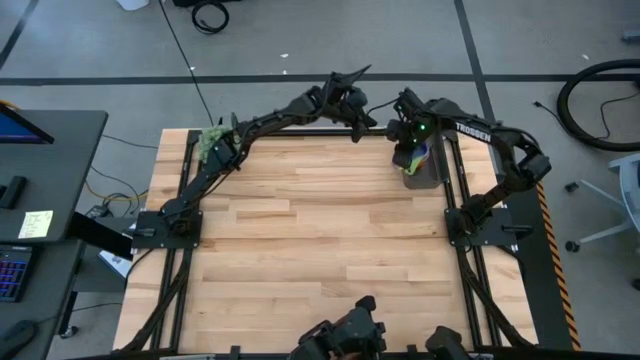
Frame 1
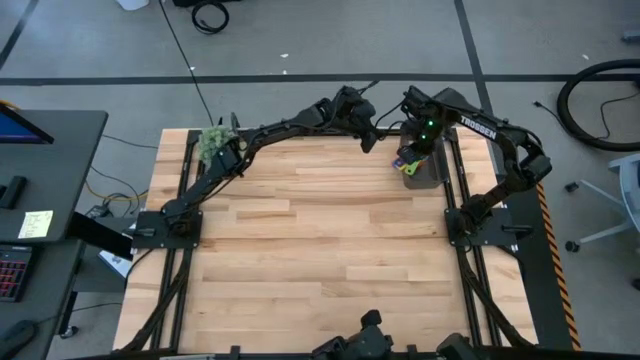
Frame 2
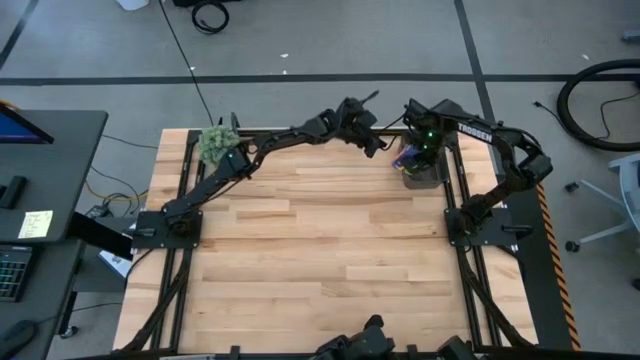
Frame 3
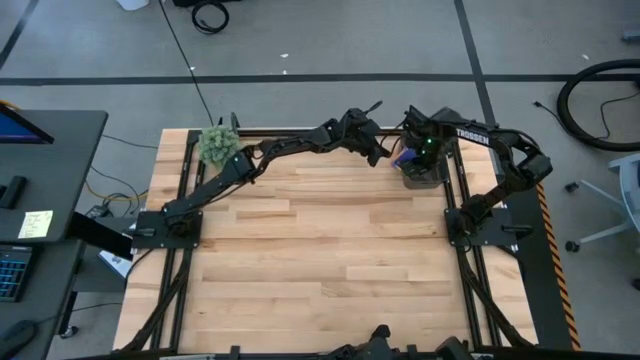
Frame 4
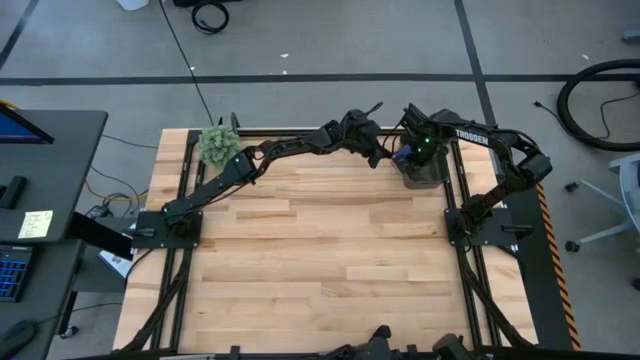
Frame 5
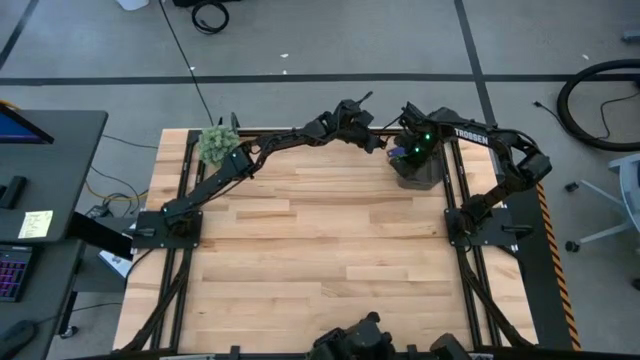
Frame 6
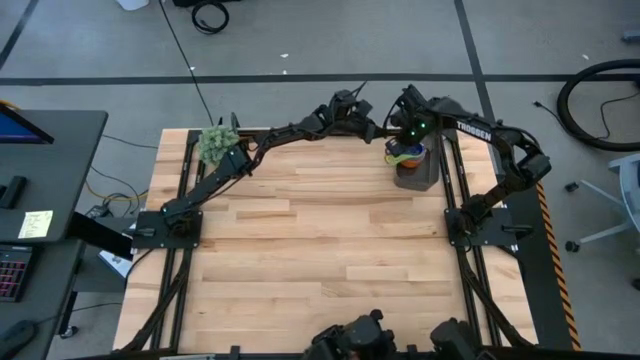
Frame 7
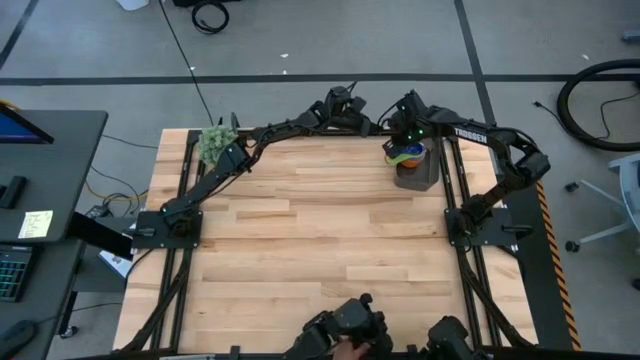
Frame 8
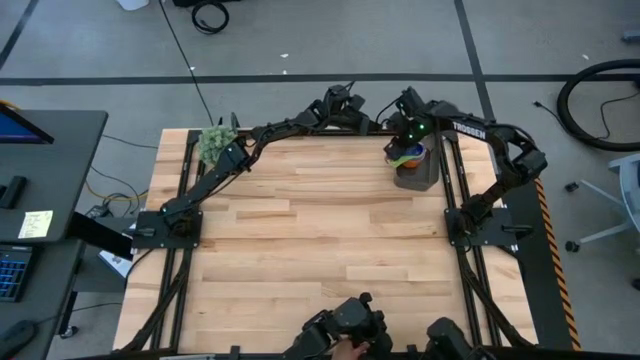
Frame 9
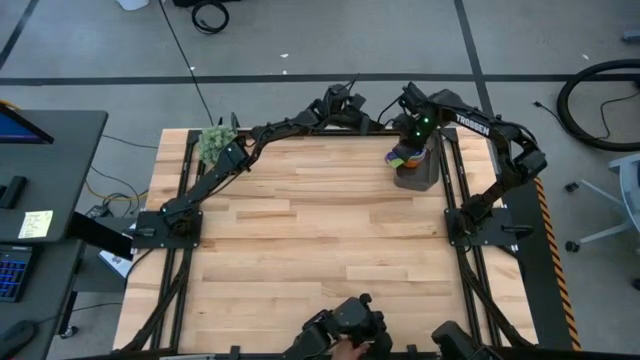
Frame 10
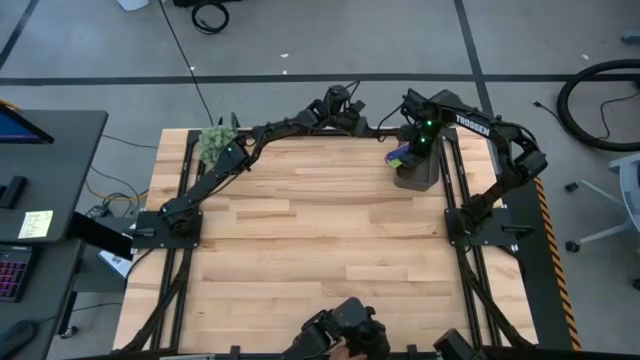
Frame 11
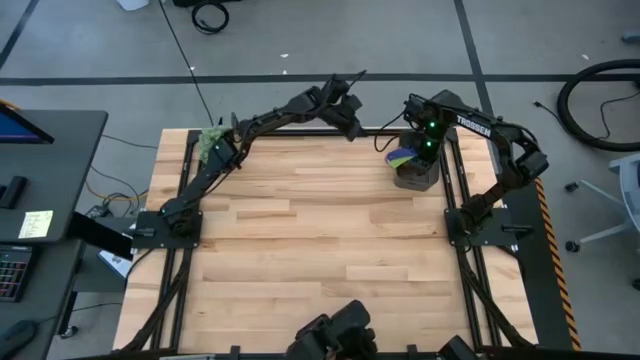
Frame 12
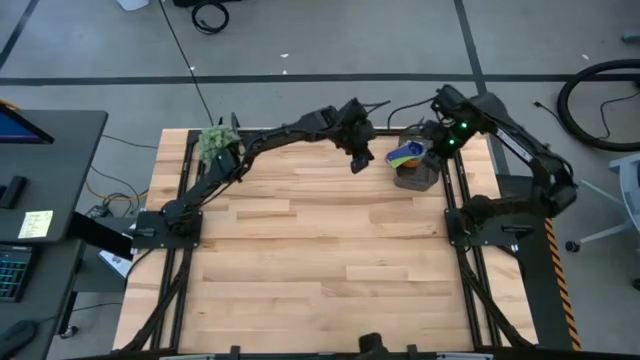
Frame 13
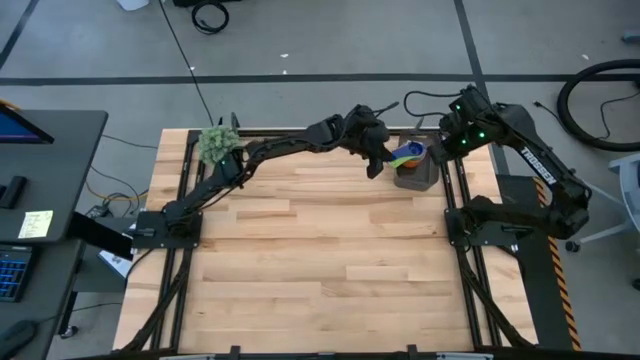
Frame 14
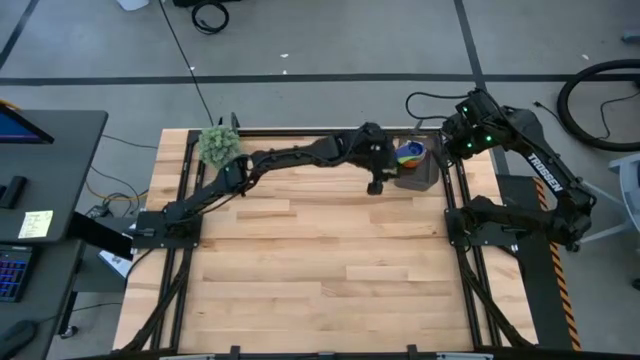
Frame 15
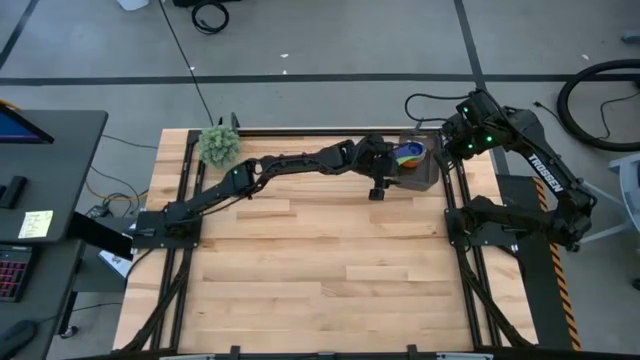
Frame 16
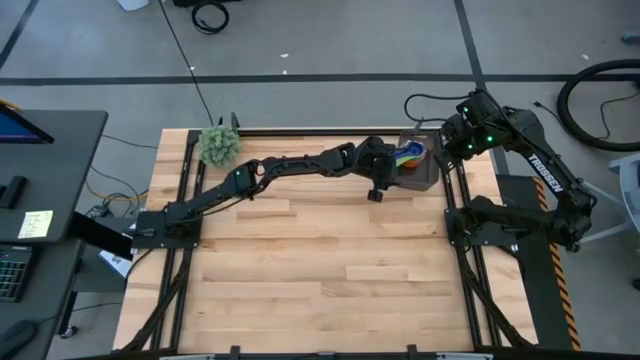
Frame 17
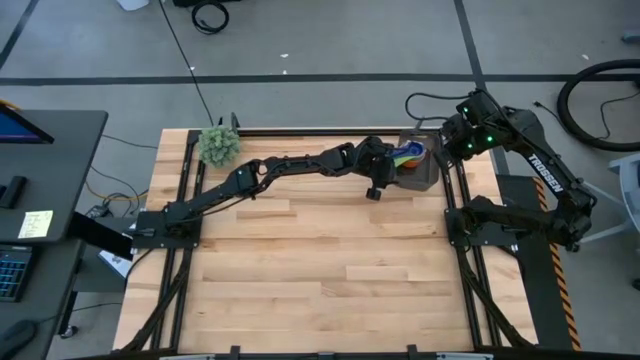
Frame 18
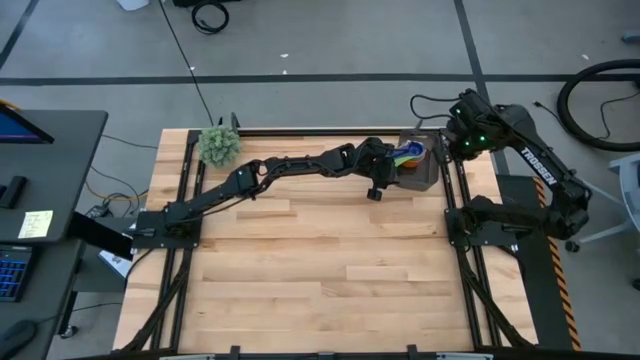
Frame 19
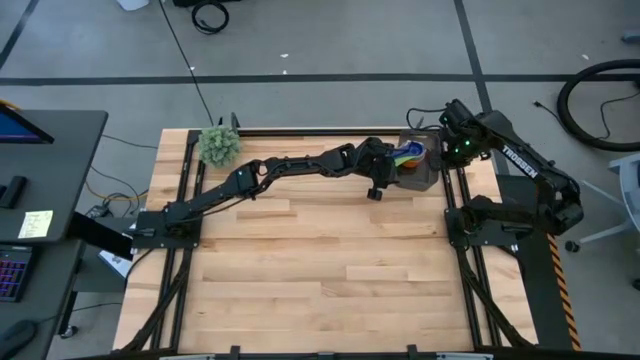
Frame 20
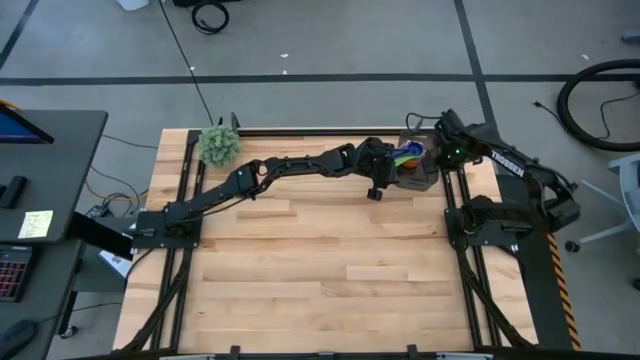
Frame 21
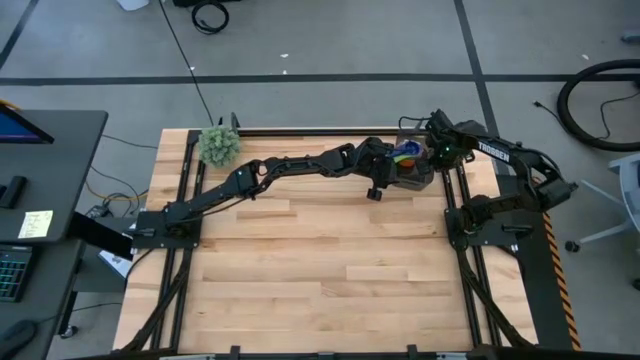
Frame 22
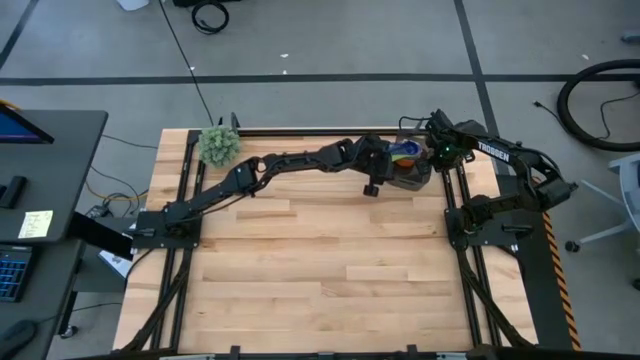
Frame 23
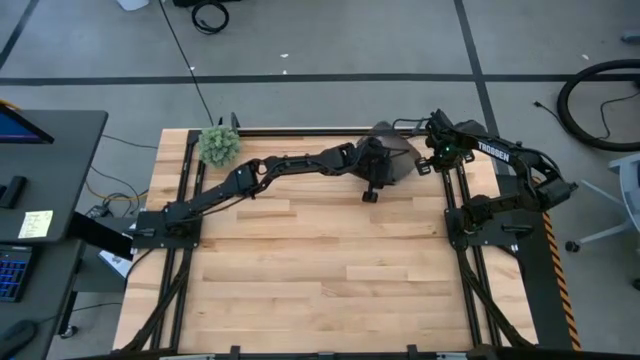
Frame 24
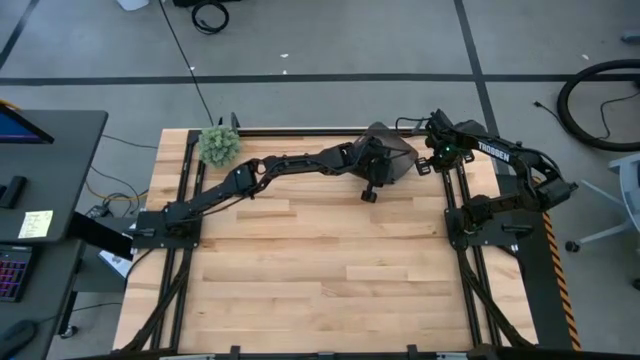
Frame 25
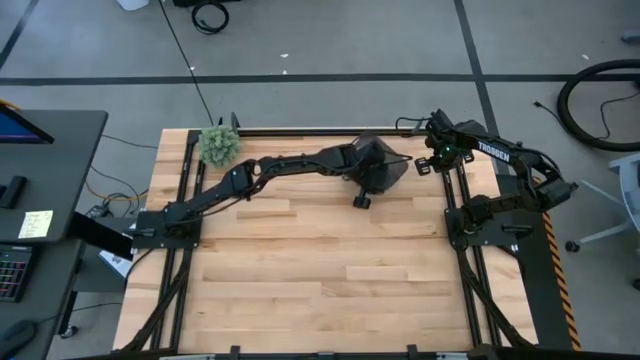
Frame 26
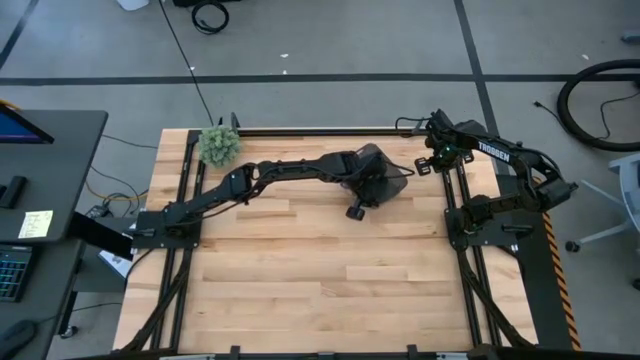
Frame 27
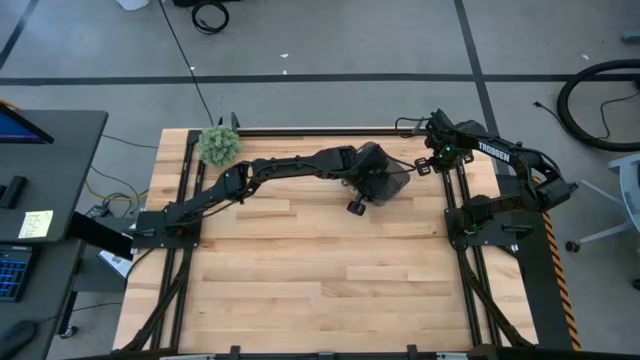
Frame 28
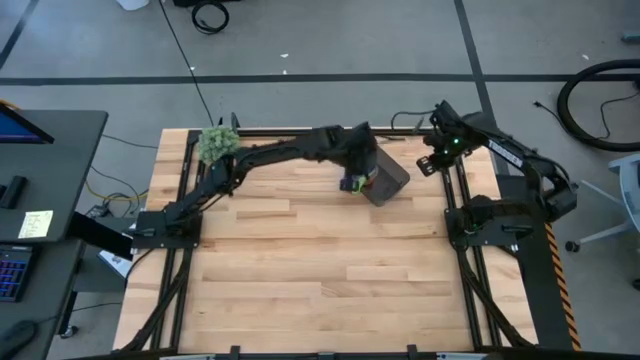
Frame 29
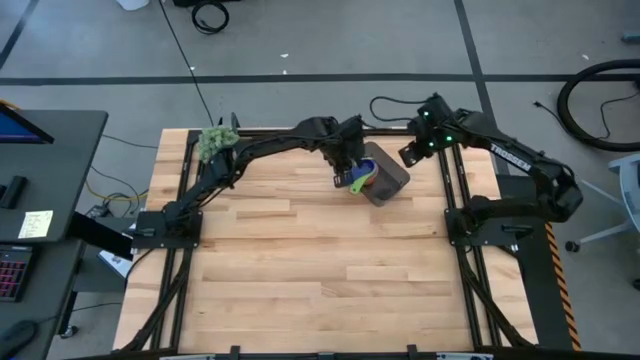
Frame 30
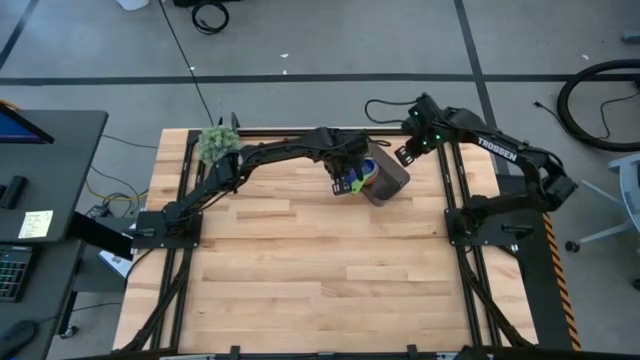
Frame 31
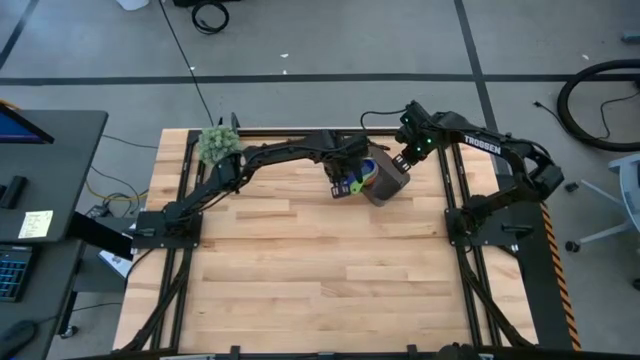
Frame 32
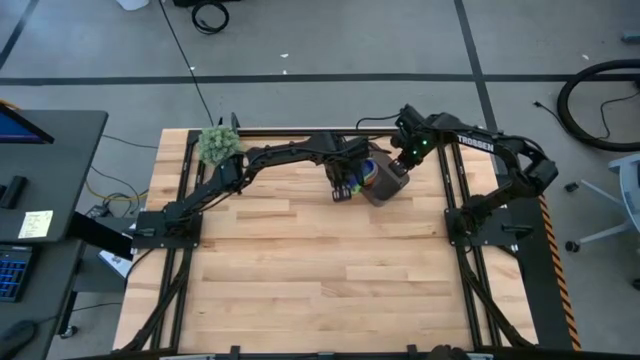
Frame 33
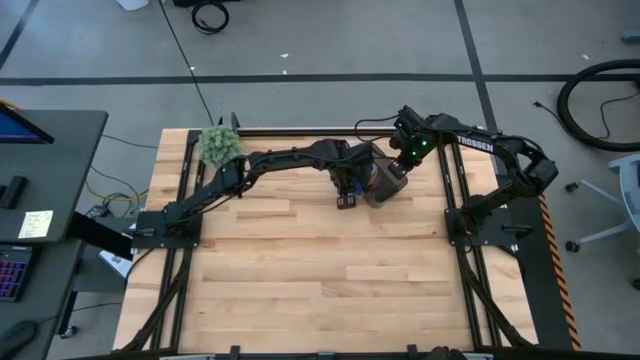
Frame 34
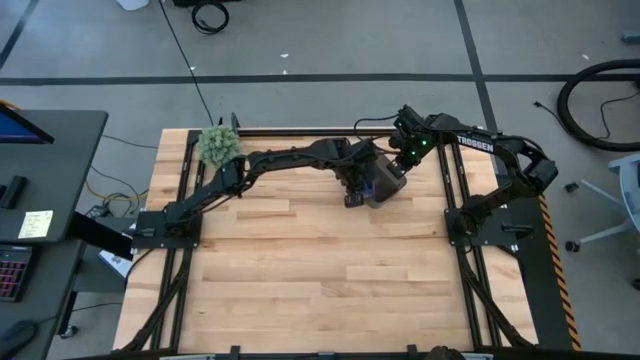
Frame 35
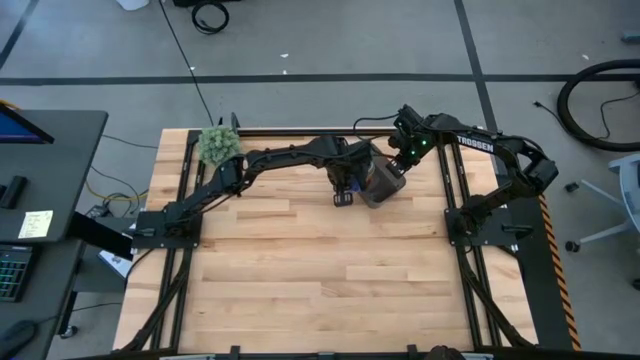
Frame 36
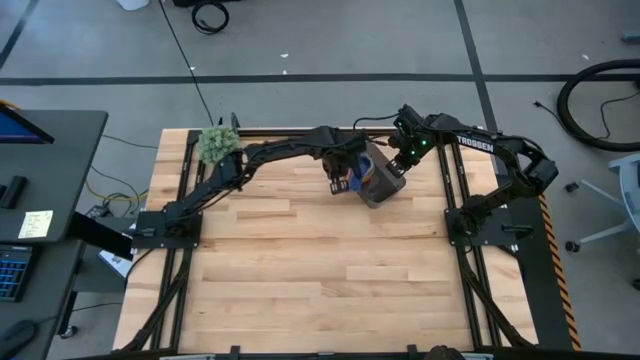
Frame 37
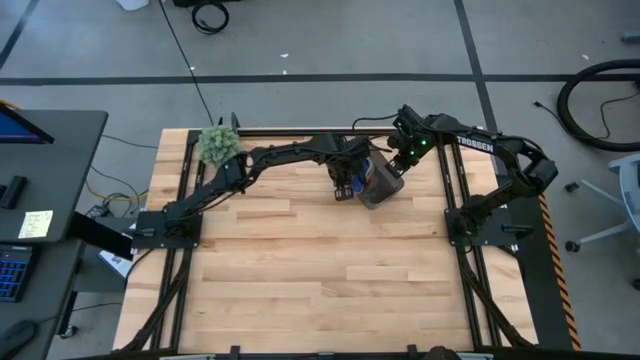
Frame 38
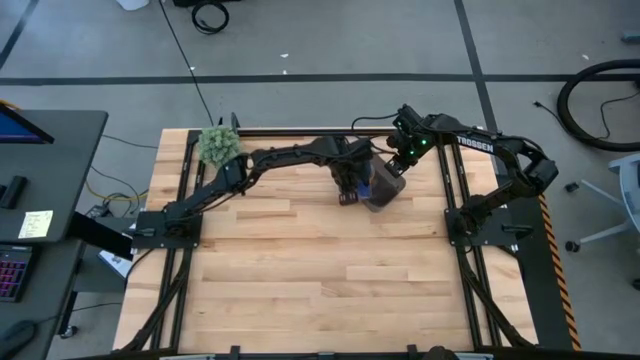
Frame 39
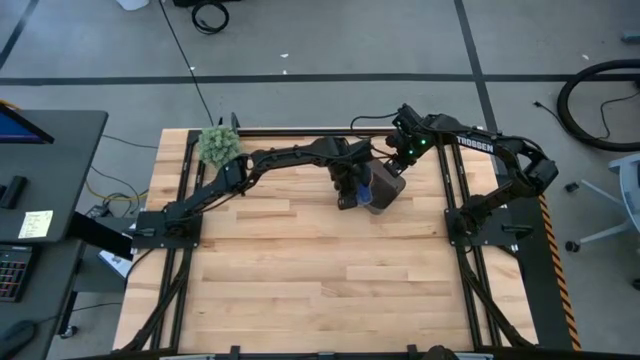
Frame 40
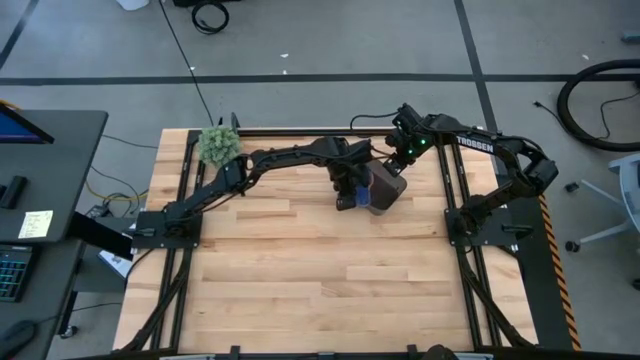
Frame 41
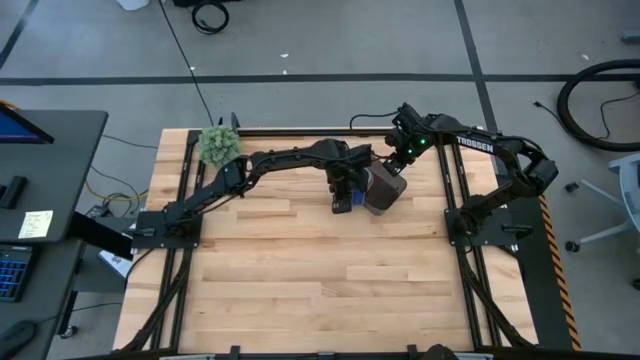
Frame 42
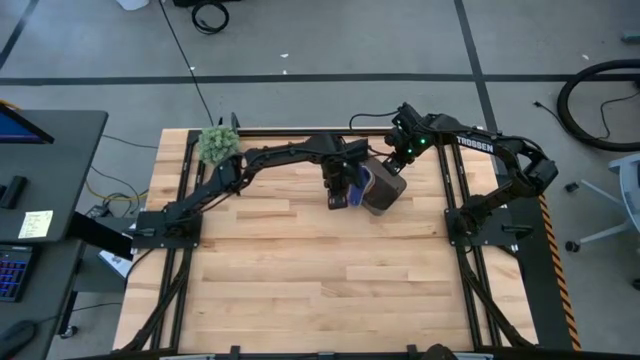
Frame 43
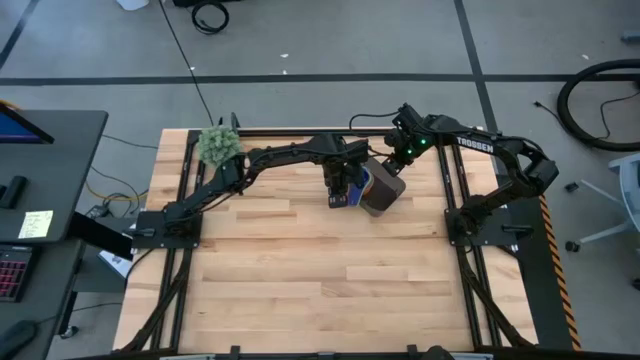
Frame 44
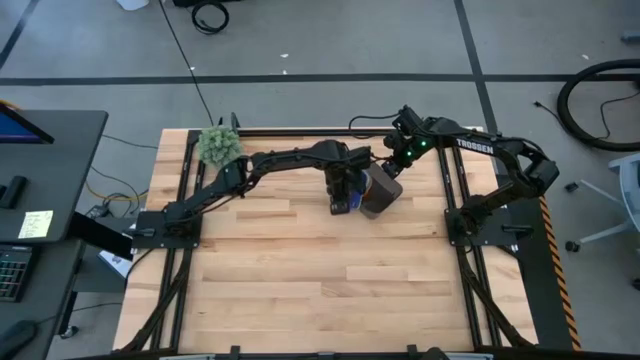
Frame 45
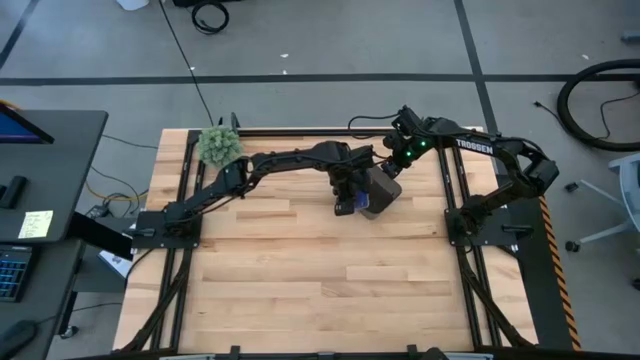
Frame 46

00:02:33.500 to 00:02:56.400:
Task: Nest measuring cups in basket
Adjust the stack of measuring cups in the black bin
